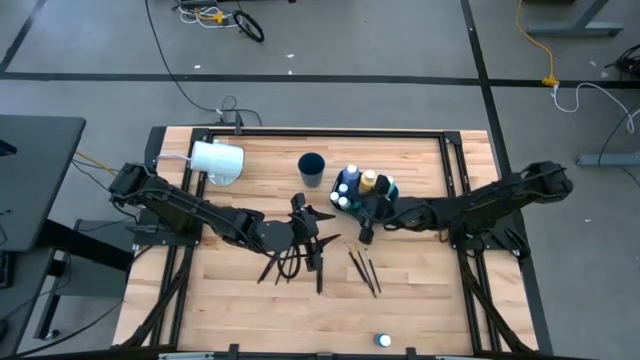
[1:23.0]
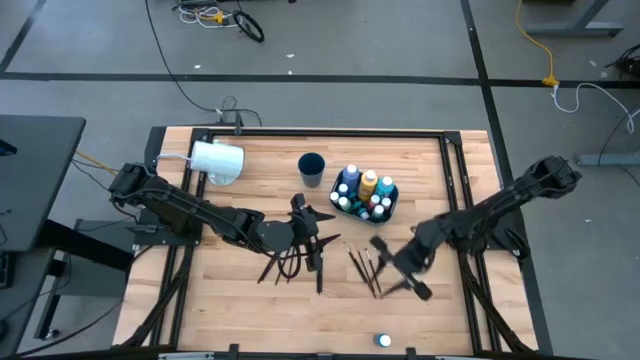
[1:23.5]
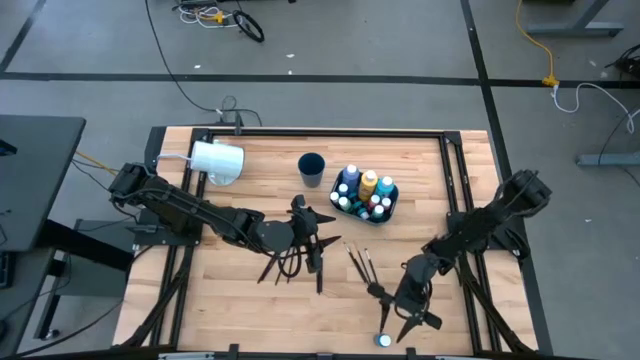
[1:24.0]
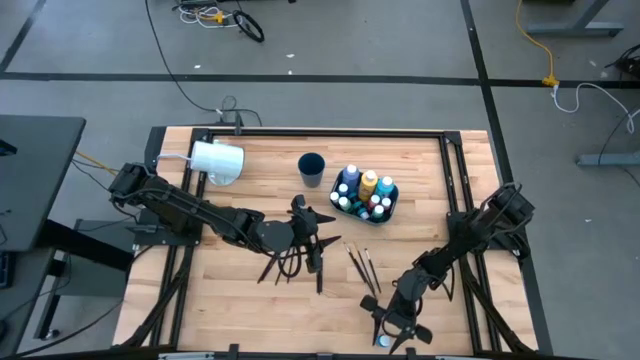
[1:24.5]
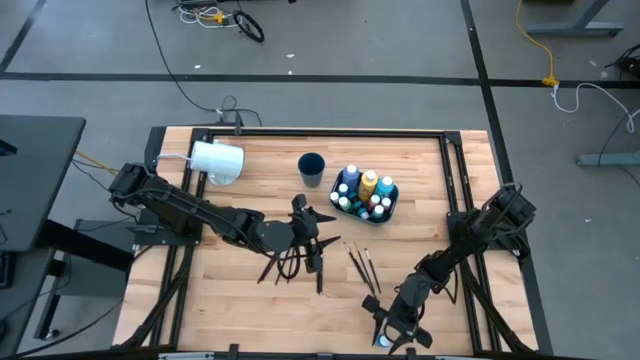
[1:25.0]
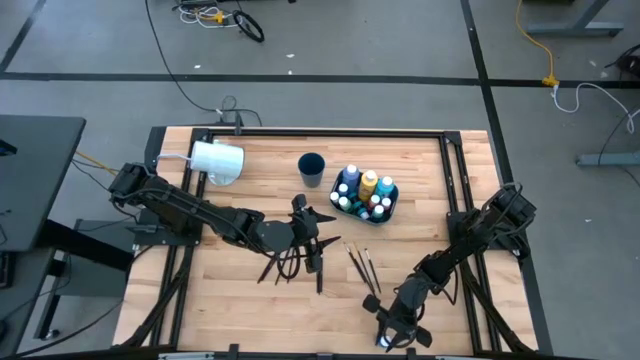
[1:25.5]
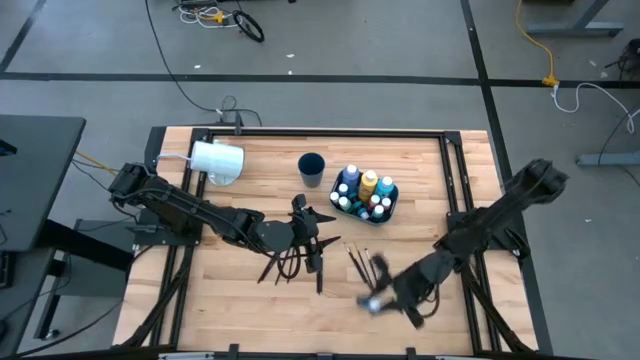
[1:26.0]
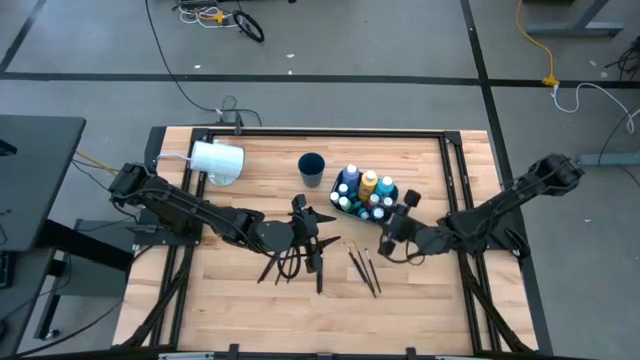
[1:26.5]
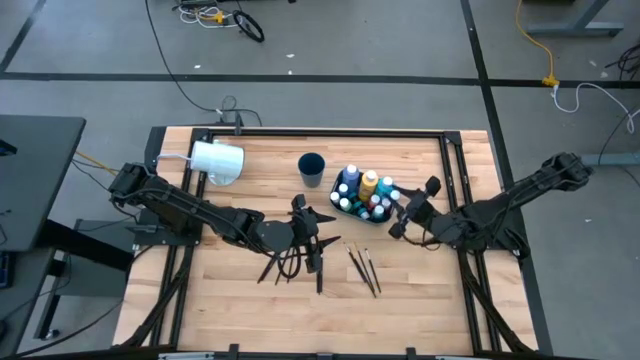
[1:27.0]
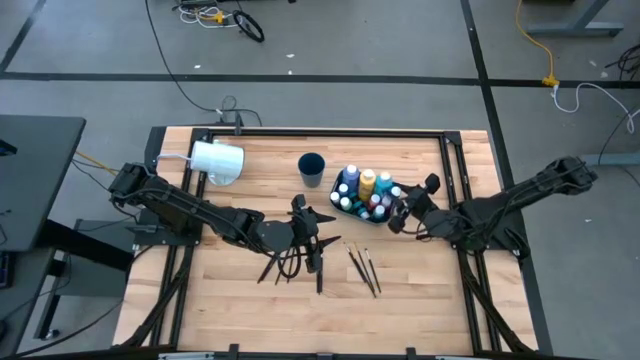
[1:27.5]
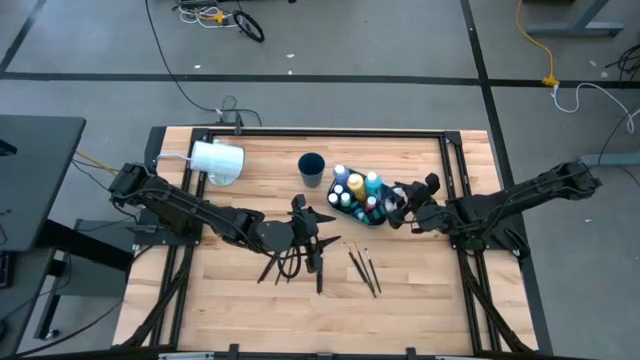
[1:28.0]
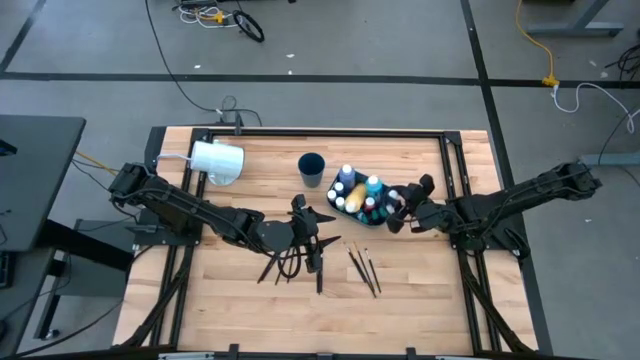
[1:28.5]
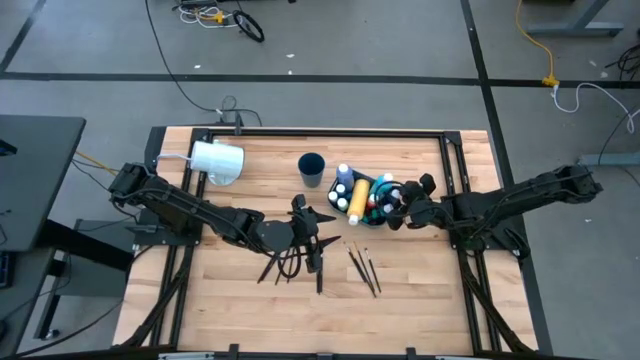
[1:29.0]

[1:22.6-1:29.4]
Task: Pick & Place Paint Supplies
Put the small light blue paint bottle into the blue bin

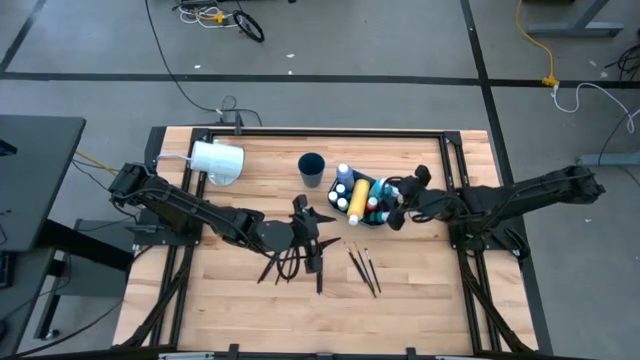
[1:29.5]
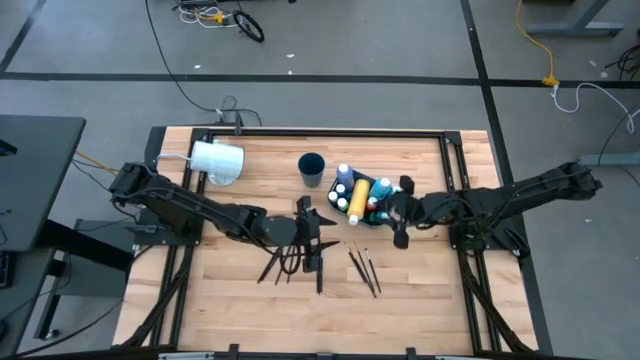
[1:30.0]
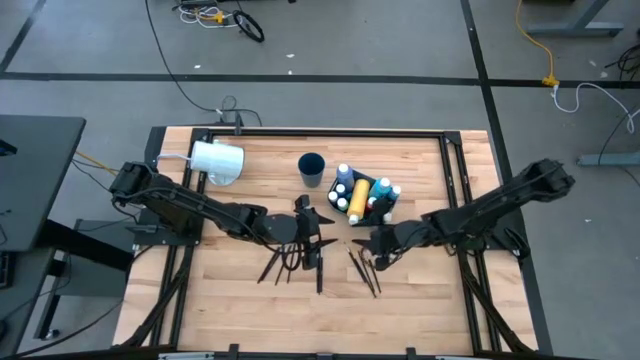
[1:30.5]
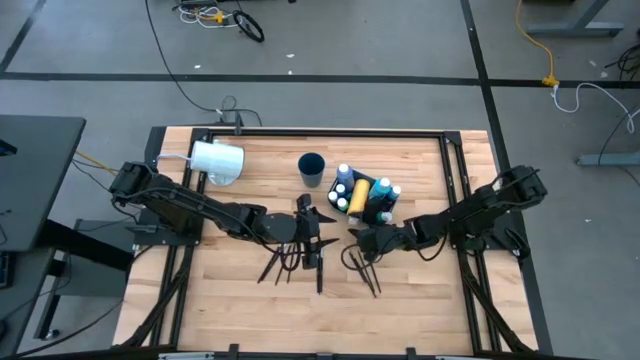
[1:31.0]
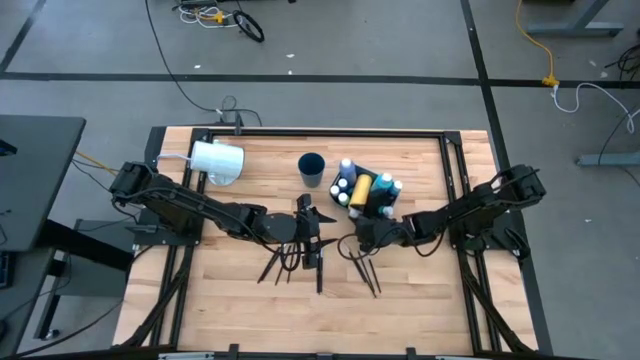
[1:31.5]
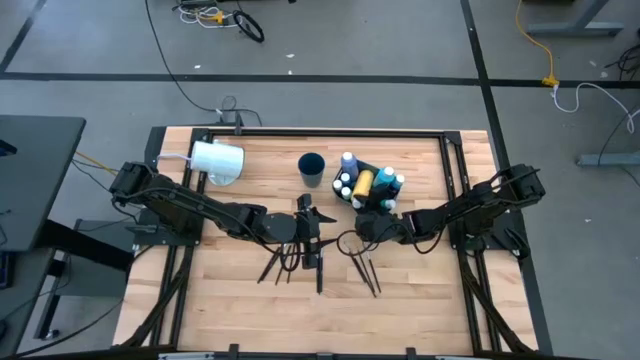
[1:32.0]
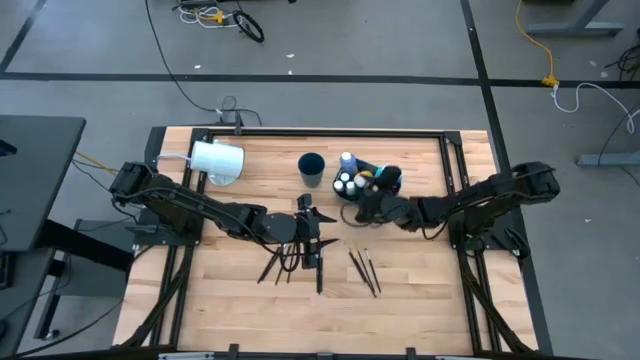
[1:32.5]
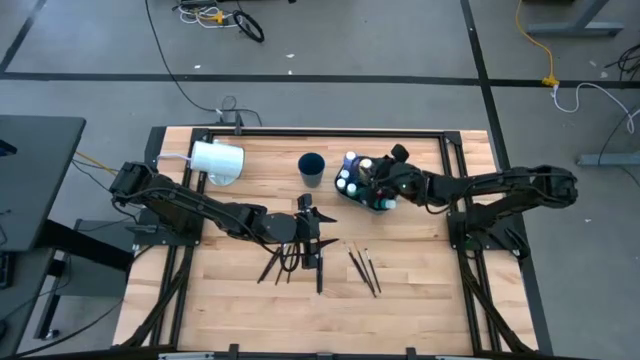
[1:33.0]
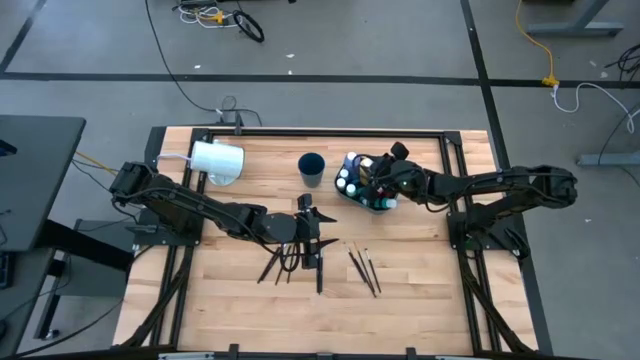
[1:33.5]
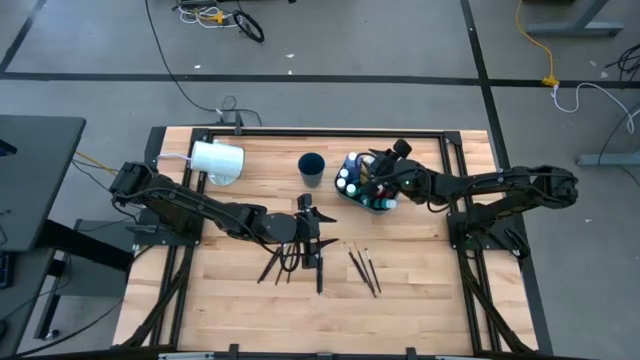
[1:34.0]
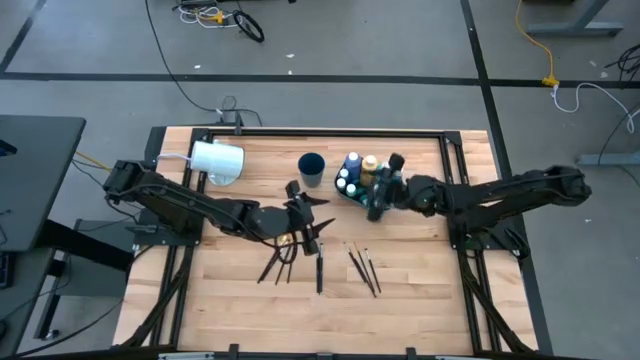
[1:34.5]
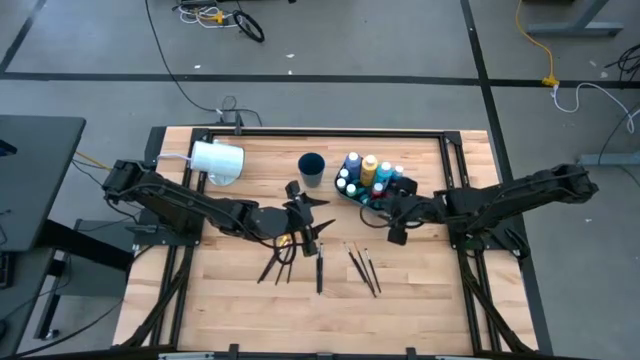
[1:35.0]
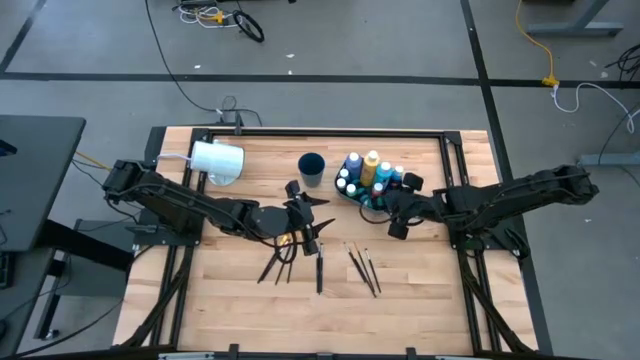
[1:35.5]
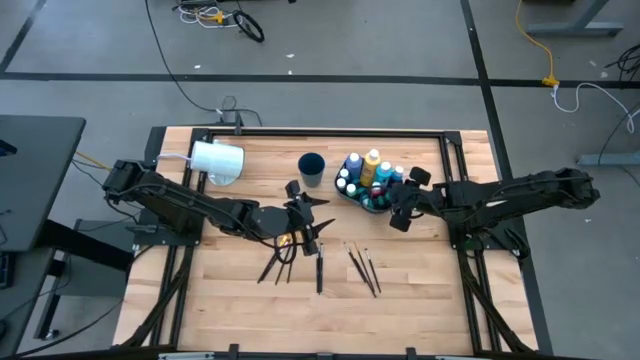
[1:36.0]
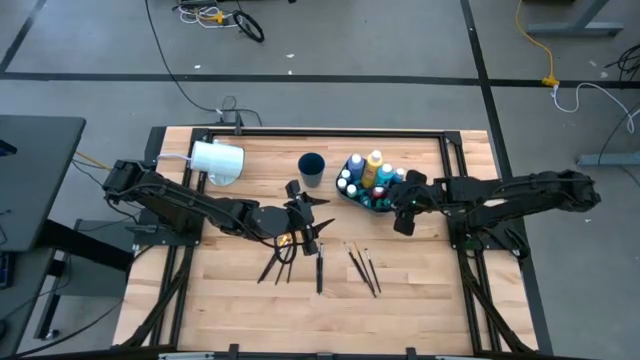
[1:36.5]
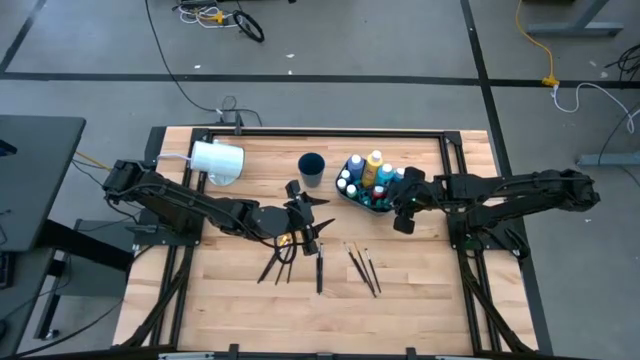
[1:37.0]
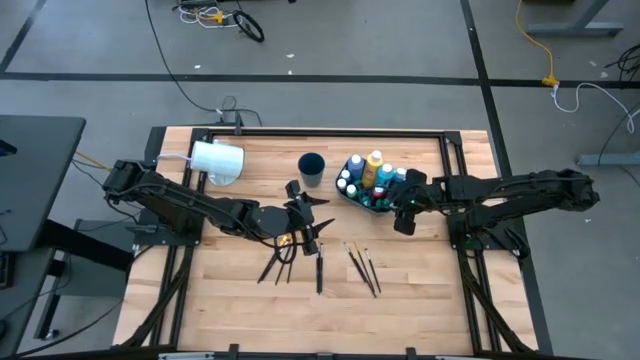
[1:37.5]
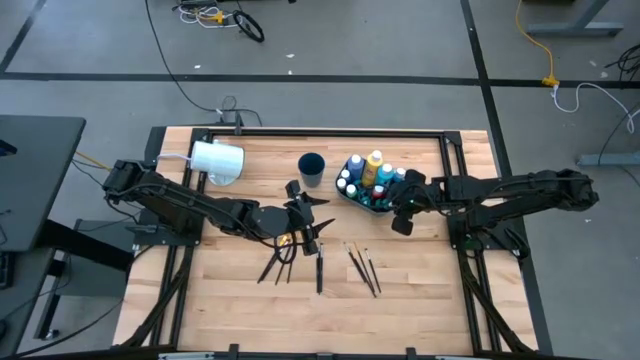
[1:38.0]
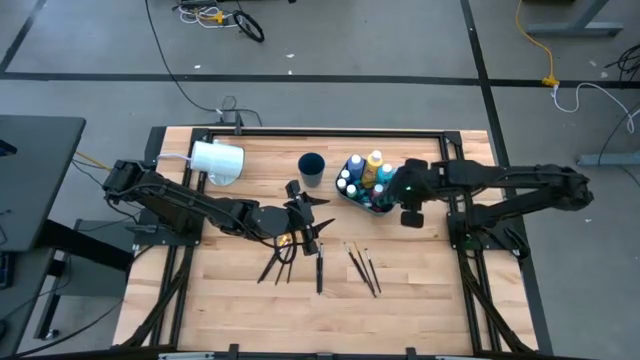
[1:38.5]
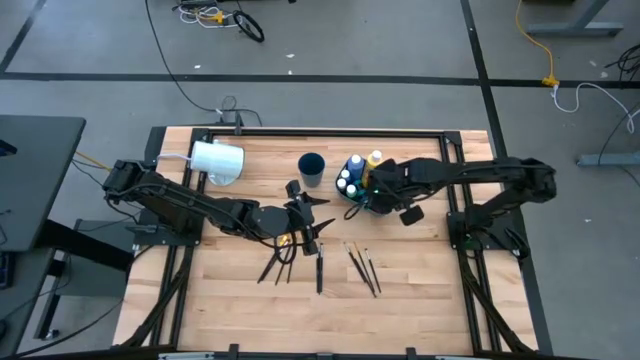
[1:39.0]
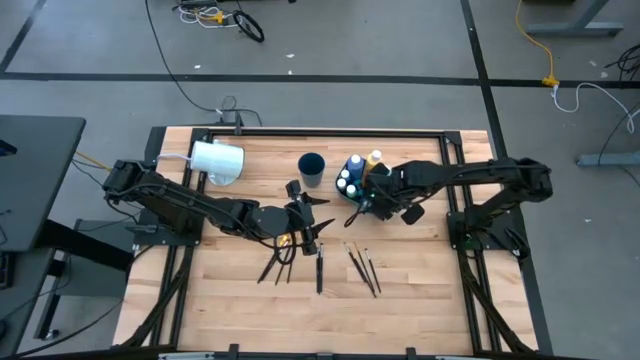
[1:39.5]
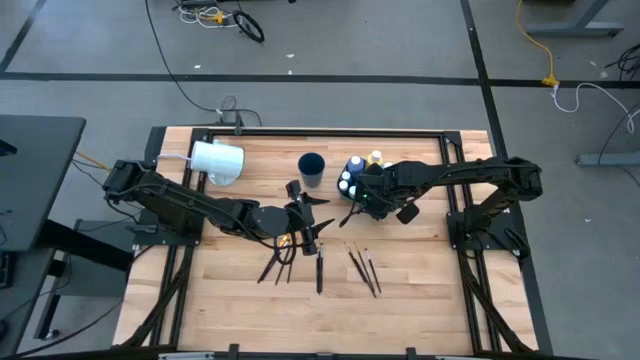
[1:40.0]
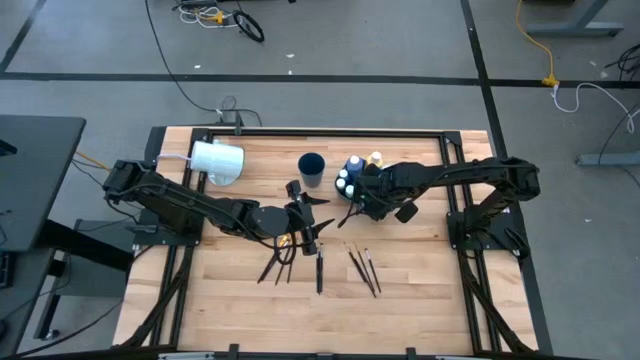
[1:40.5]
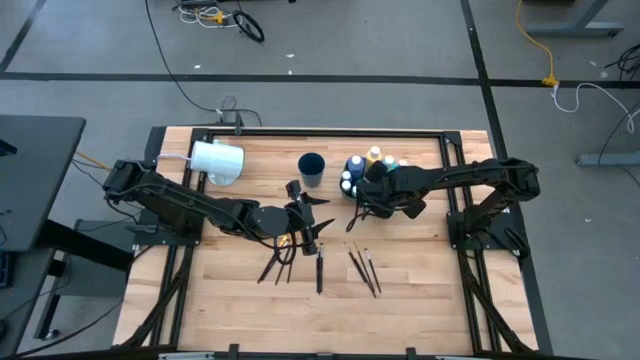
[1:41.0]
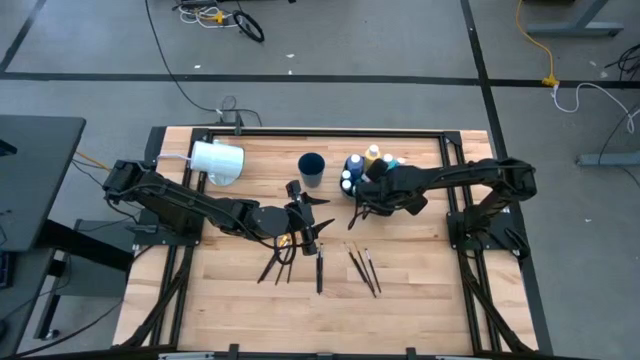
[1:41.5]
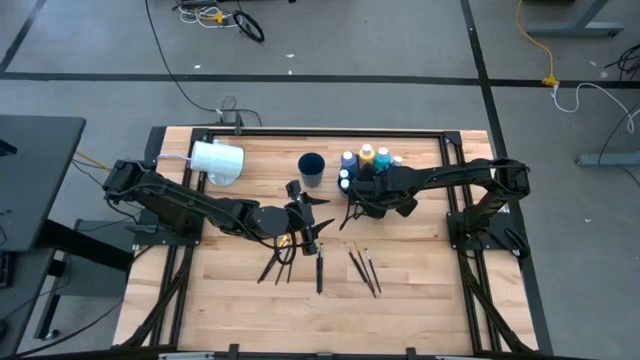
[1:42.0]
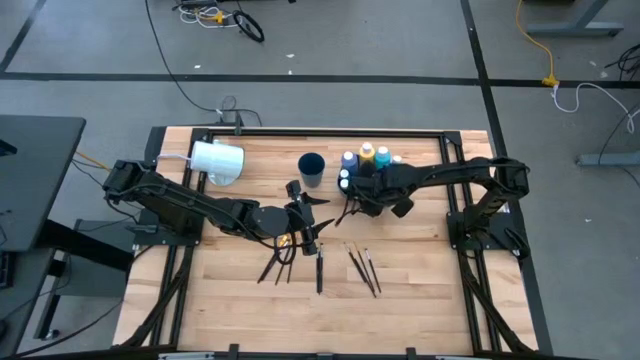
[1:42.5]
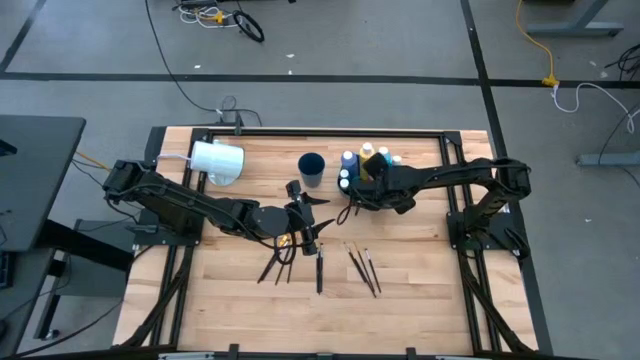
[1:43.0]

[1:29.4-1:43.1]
Adjust the paint bottles in the blue bin
